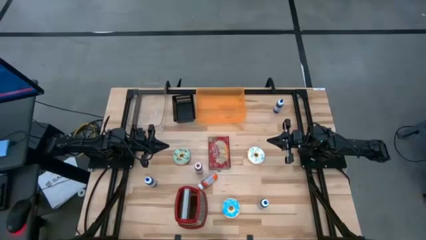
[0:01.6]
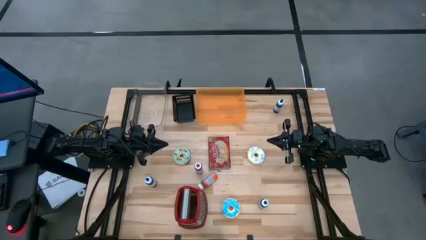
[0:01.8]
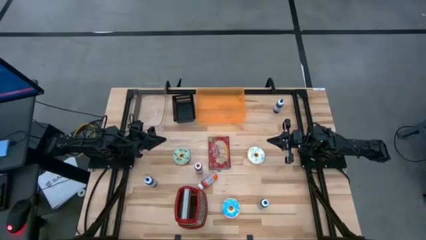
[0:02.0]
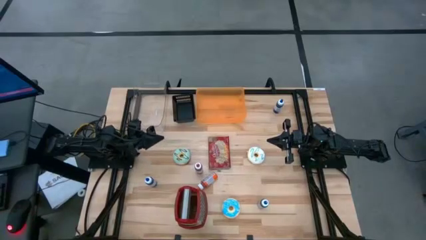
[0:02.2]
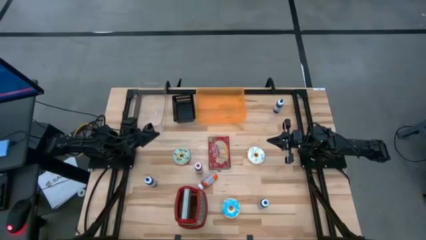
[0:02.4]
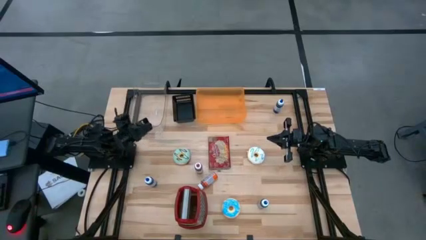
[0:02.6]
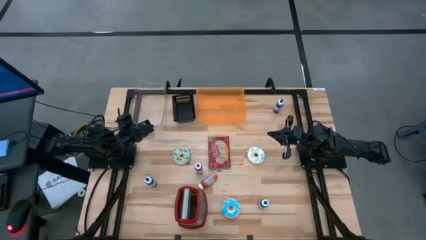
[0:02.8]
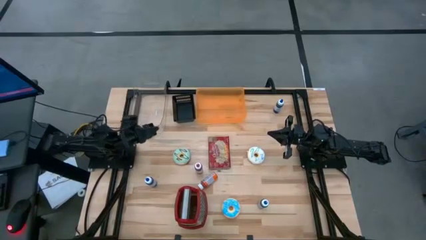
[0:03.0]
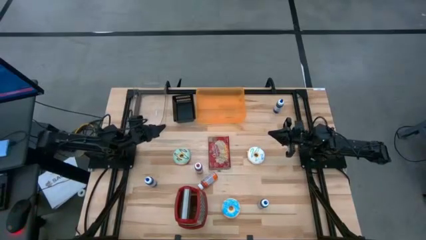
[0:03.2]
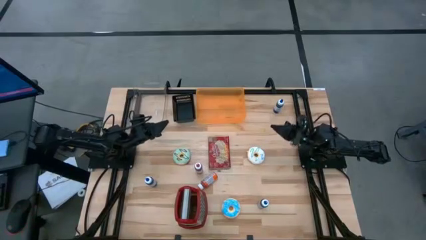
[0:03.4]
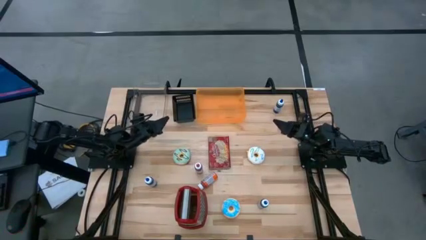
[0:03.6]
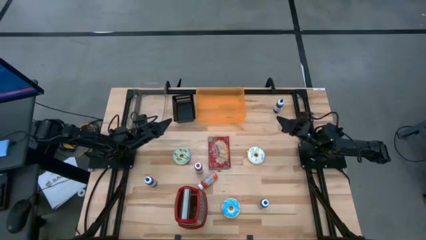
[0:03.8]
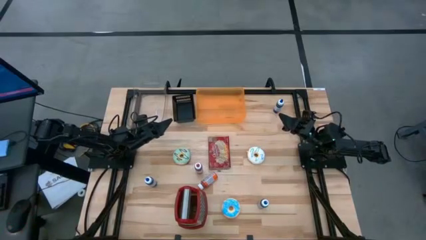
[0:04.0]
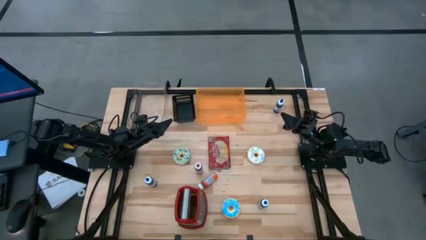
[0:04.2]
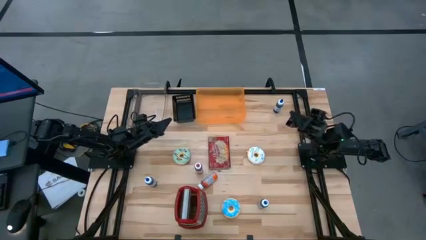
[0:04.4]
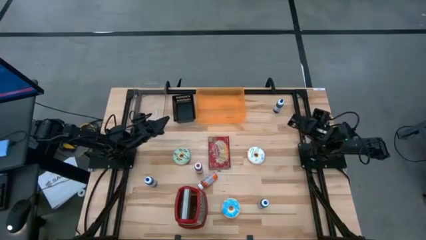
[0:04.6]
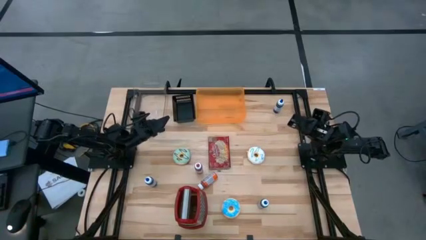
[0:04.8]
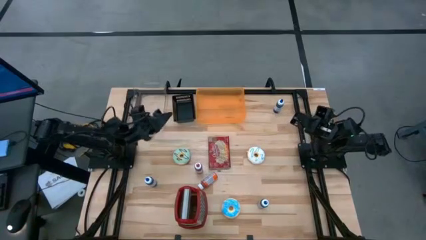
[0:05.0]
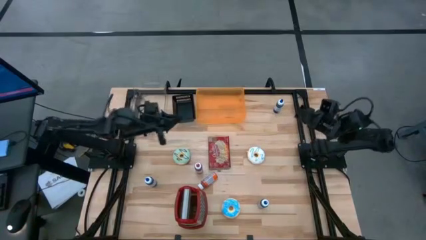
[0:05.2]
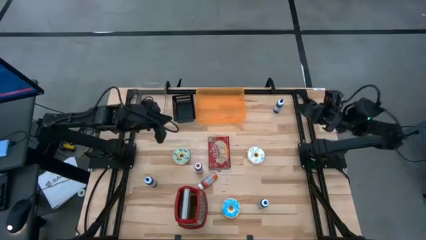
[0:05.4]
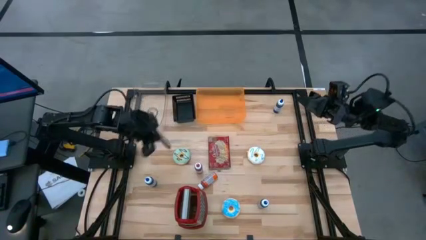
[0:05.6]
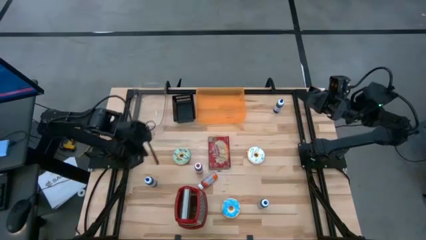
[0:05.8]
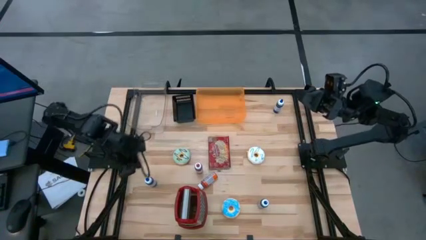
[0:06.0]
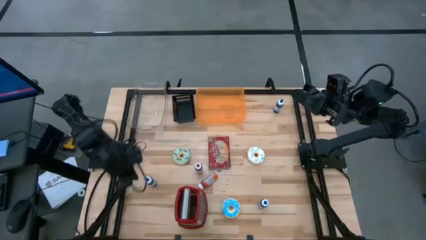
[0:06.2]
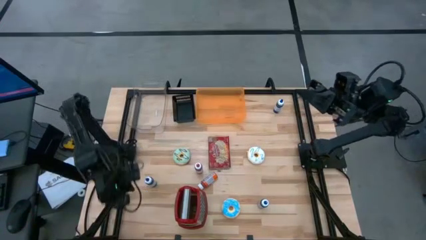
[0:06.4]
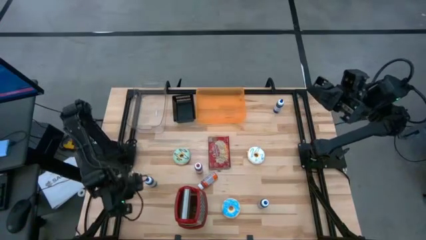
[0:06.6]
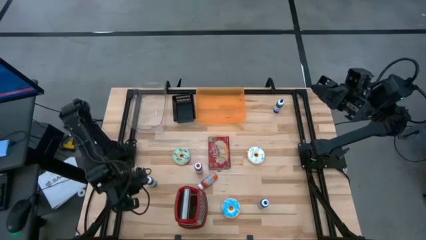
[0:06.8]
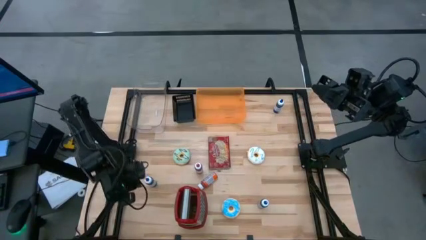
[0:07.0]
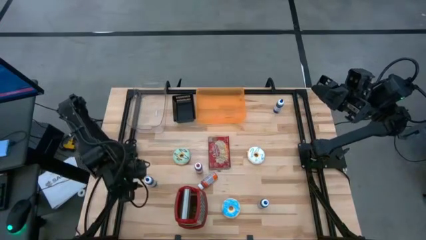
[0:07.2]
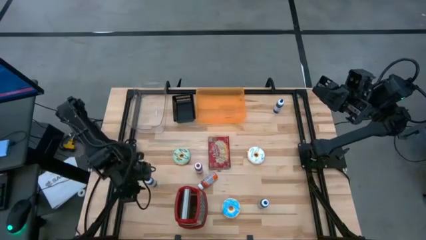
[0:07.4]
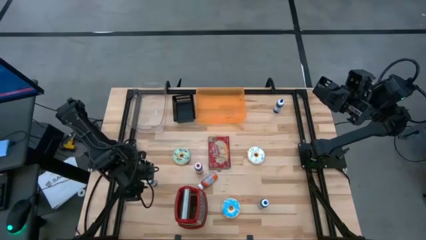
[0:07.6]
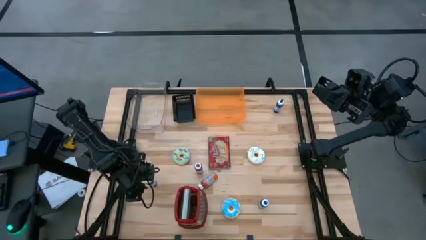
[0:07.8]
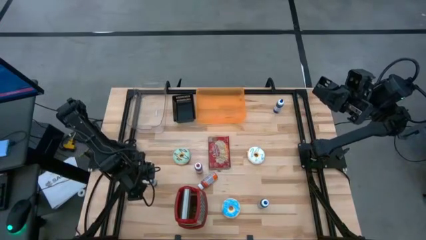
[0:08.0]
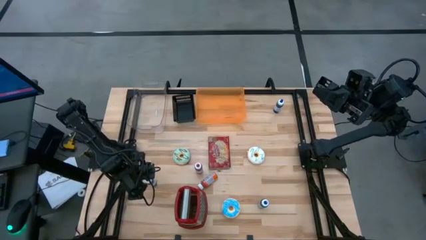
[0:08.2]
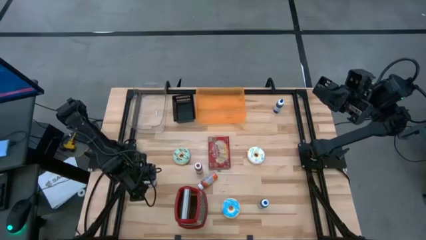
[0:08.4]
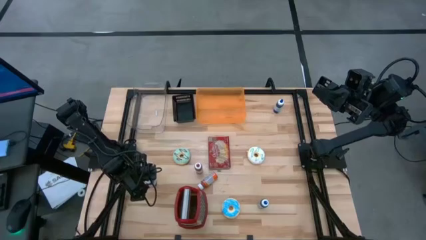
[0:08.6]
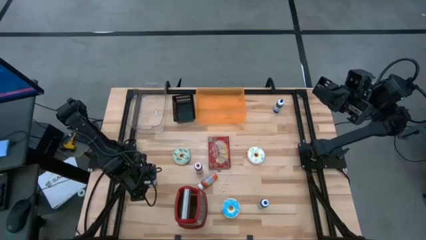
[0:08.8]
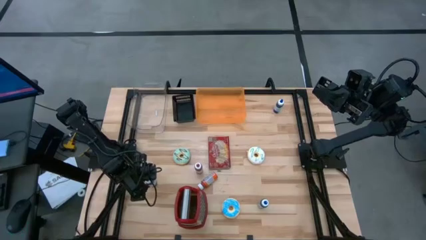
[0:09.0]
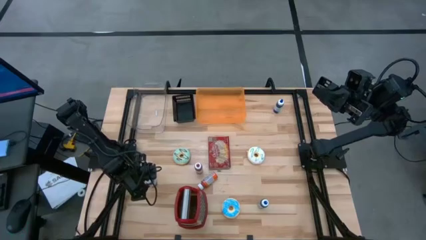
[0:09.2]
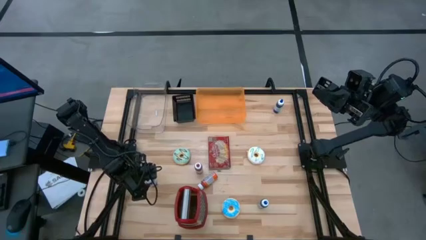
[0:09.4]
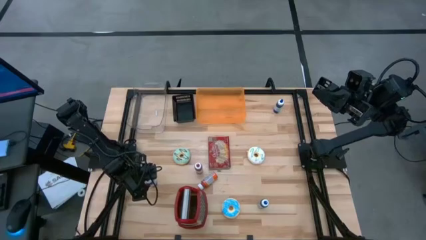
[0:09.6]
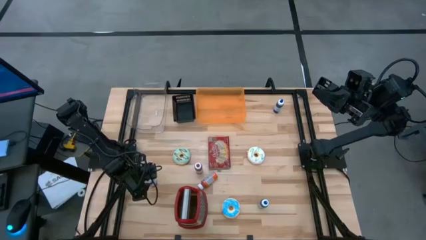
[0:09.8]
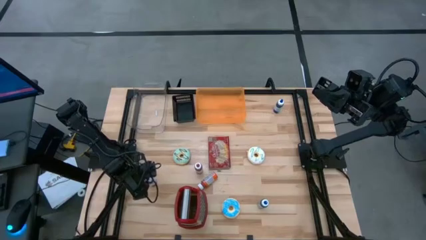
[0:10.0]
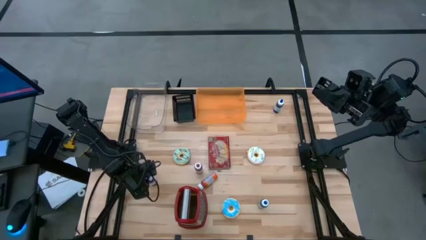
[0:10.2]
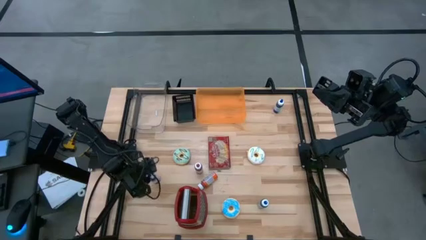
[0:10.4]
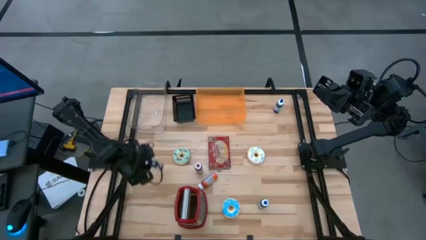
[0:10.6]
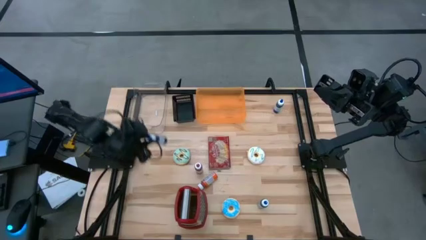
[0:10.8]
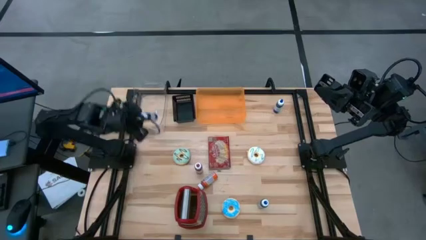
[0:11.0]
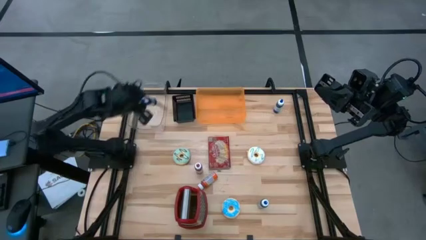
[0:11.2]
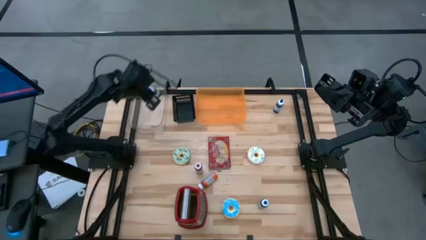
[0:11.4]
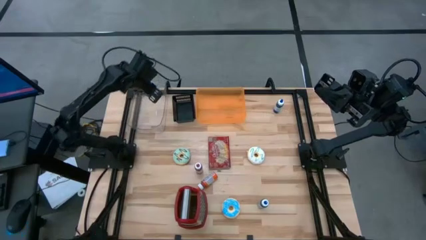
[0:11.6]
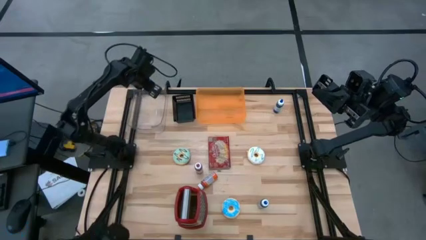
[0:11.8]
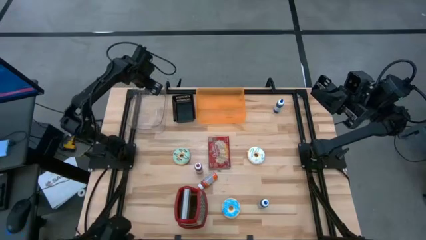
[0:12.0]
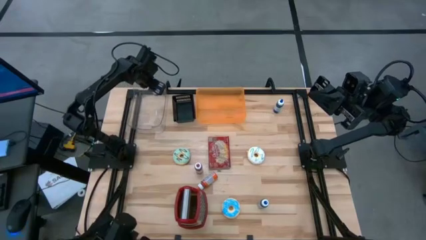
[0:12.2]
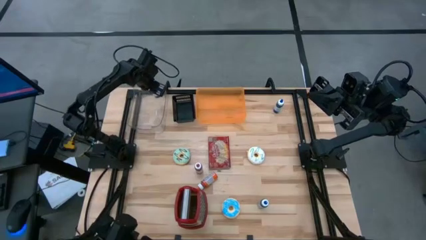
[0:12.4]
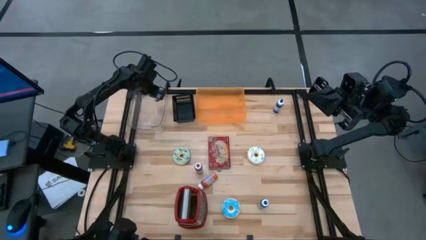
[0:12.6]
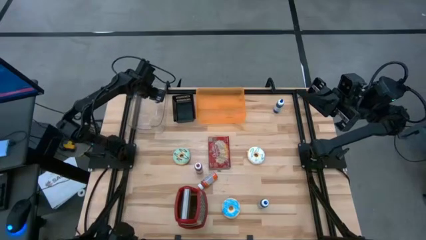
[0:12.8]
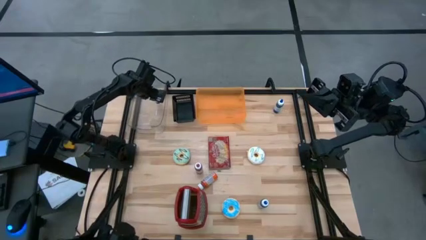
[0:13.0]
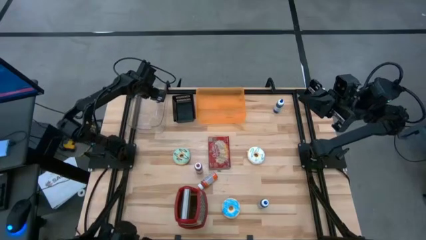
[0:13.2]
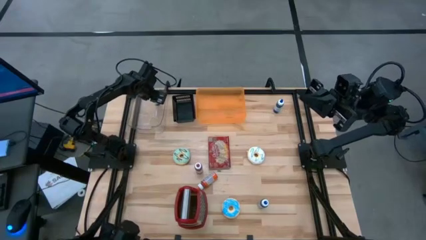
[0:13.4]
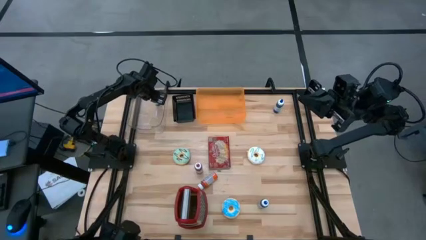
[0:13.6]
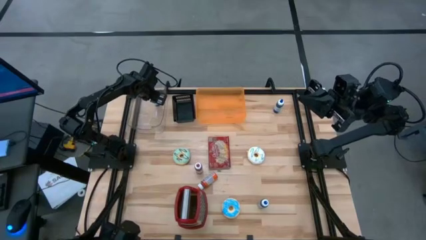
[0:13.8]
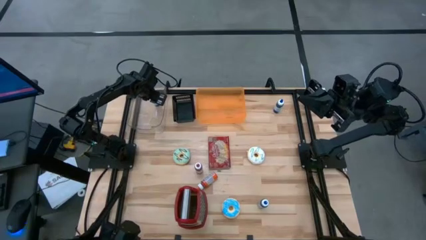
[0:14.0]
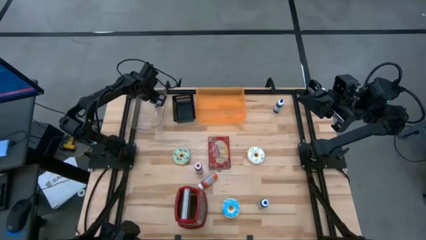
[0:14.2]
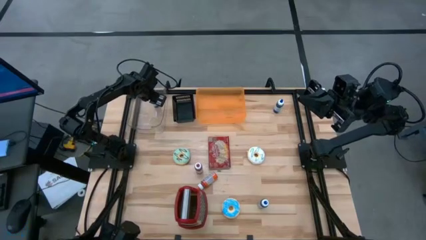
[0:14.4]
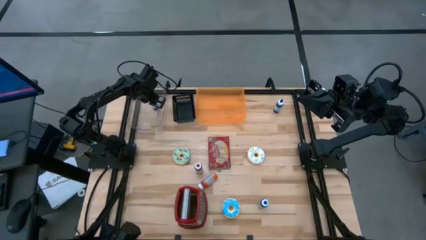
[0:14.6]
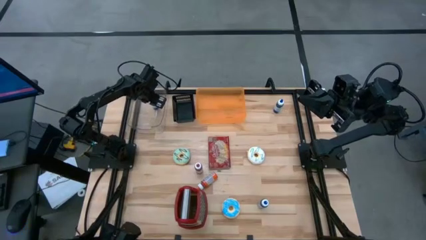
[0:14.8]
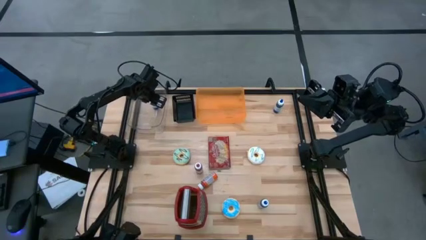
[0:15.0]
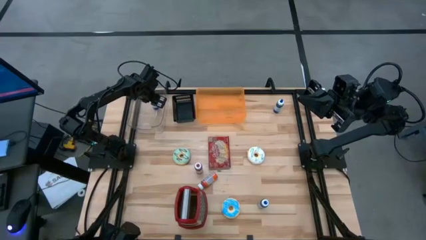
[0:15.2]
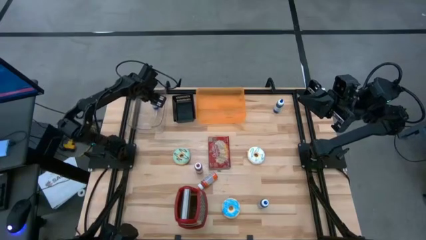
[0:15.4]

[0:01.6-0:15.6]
Put the bottom left blue food coloring bottle into the transparent bin
